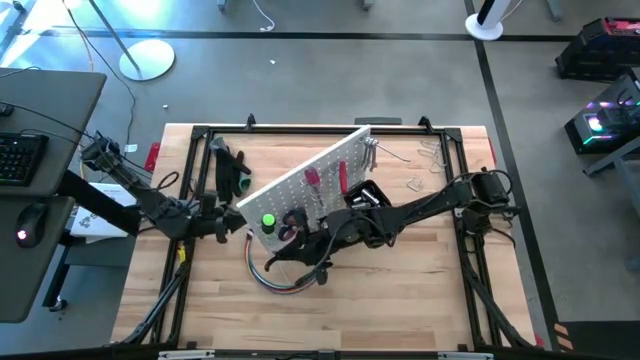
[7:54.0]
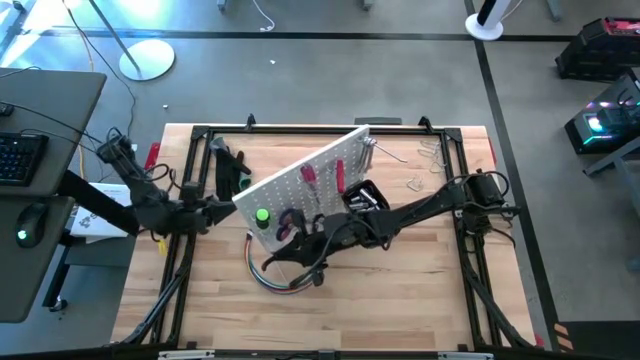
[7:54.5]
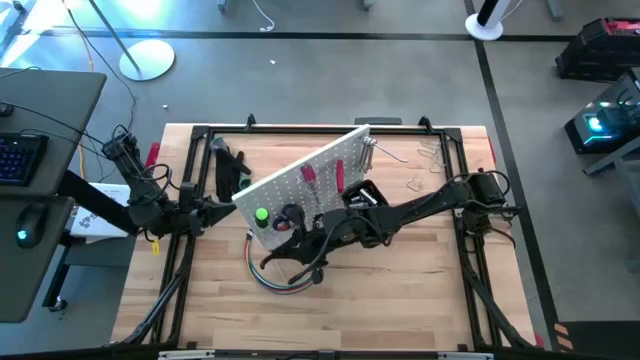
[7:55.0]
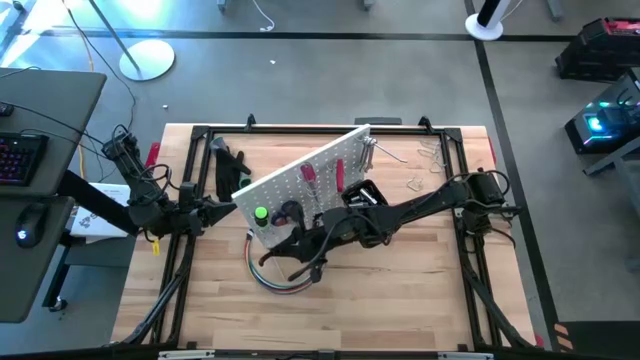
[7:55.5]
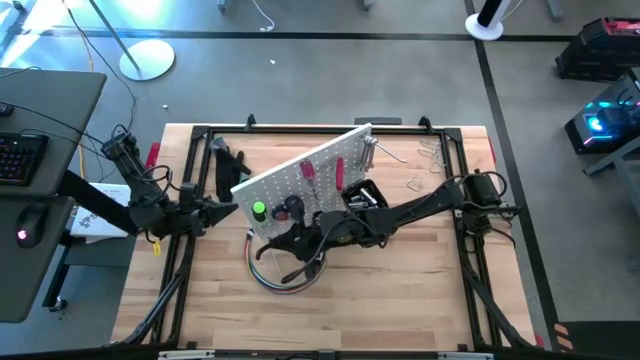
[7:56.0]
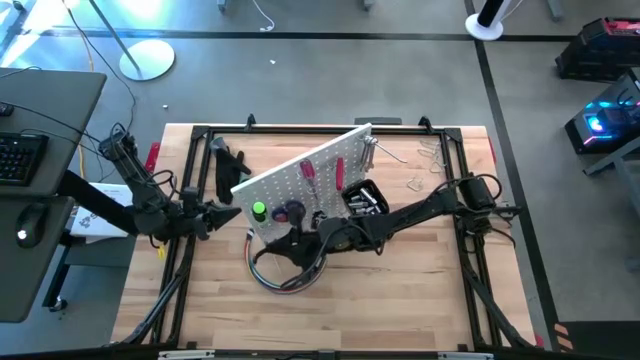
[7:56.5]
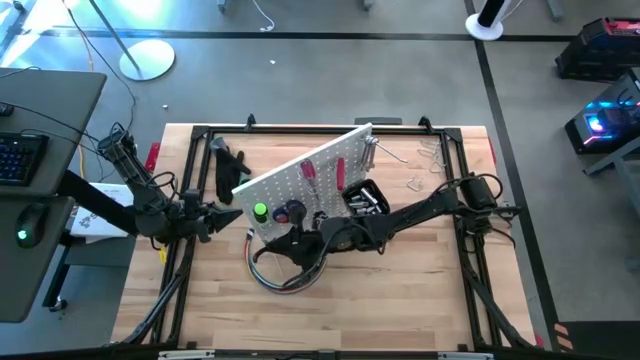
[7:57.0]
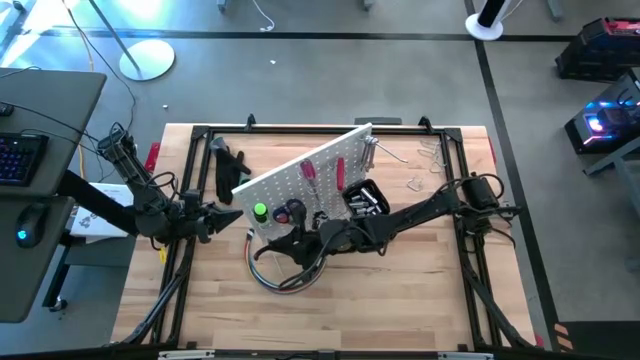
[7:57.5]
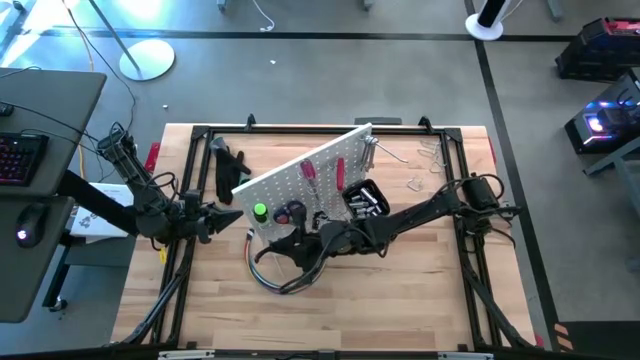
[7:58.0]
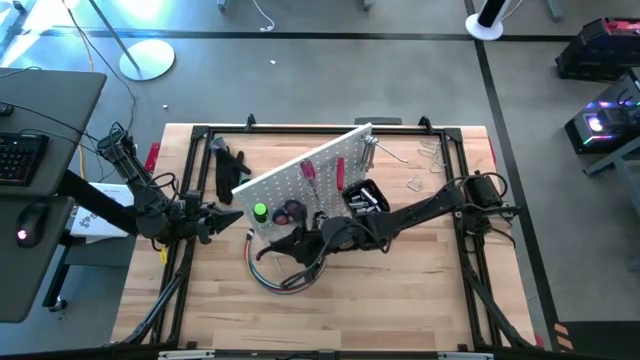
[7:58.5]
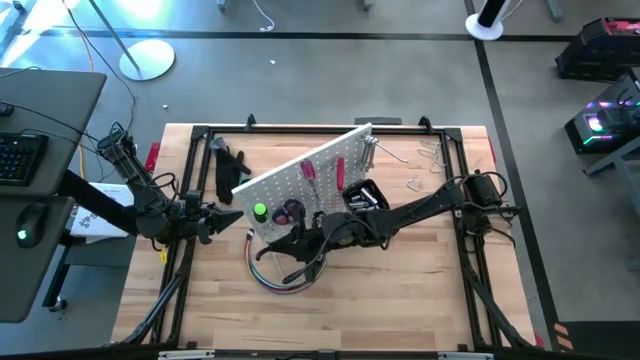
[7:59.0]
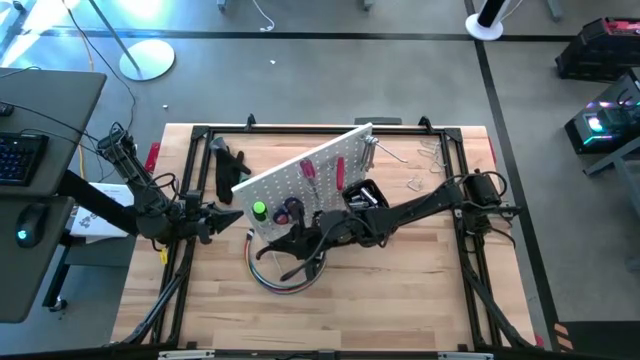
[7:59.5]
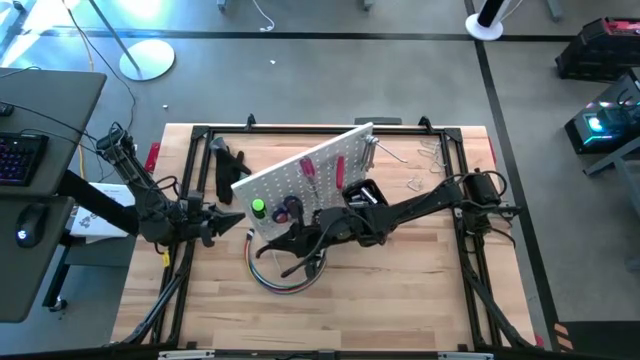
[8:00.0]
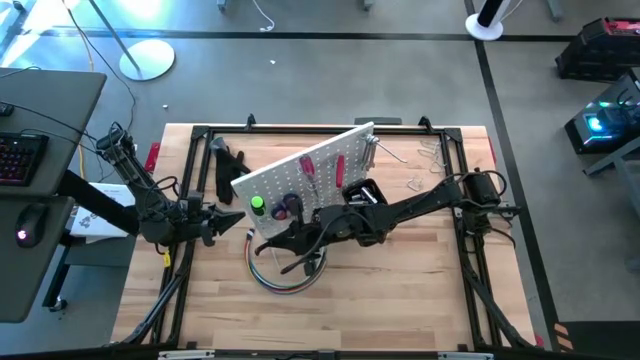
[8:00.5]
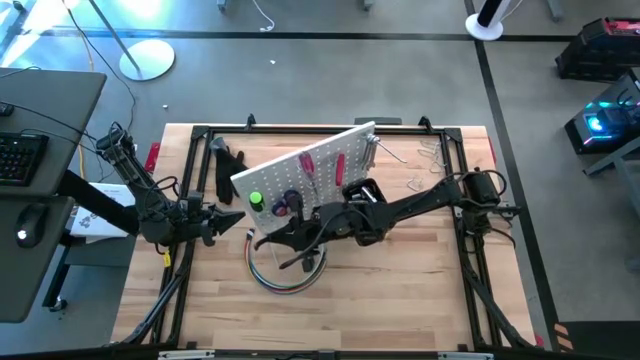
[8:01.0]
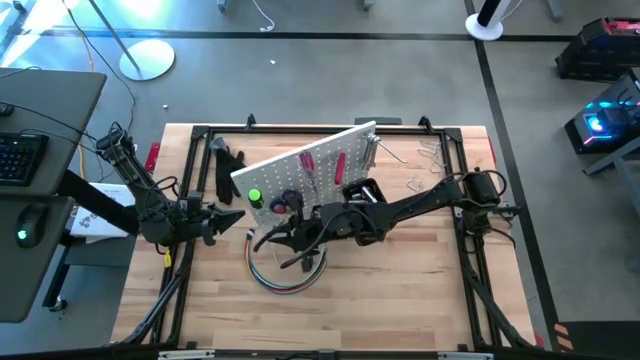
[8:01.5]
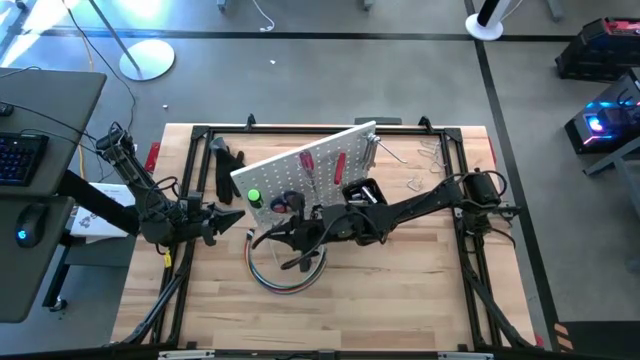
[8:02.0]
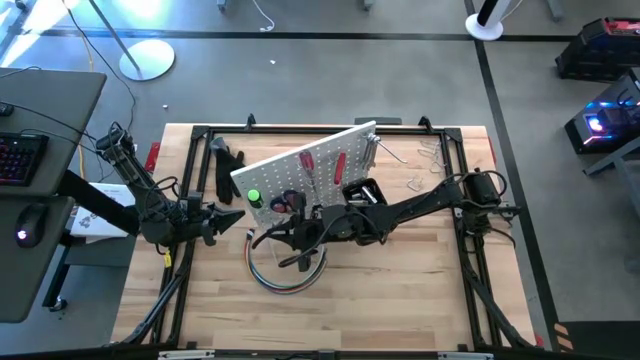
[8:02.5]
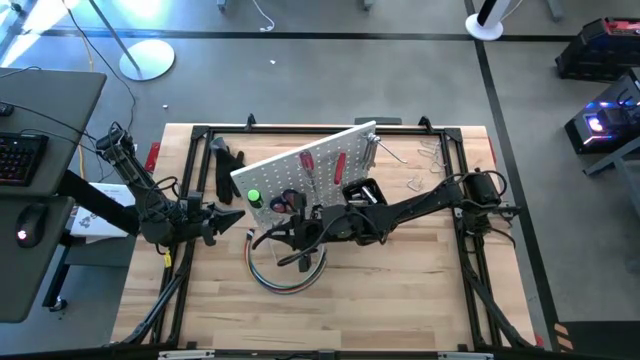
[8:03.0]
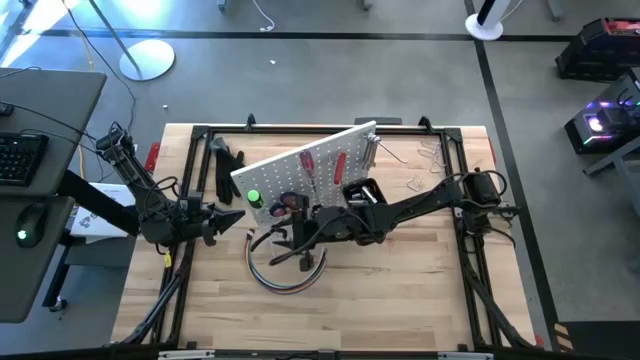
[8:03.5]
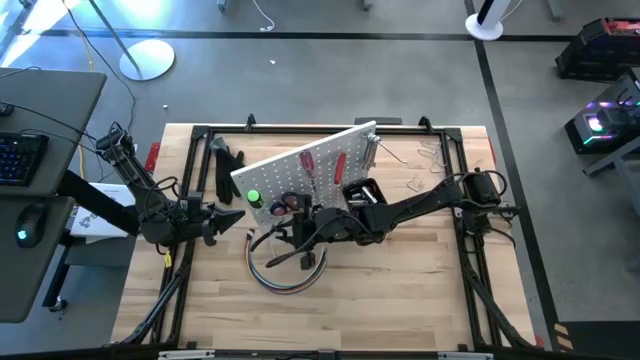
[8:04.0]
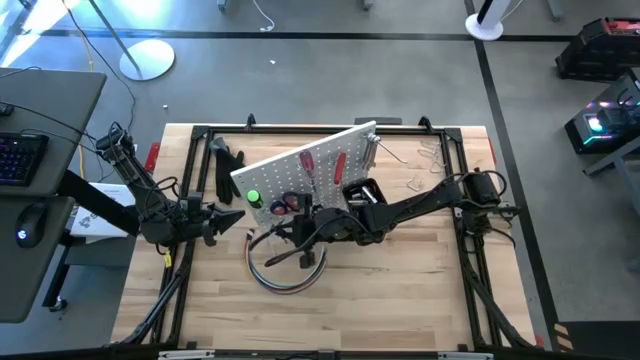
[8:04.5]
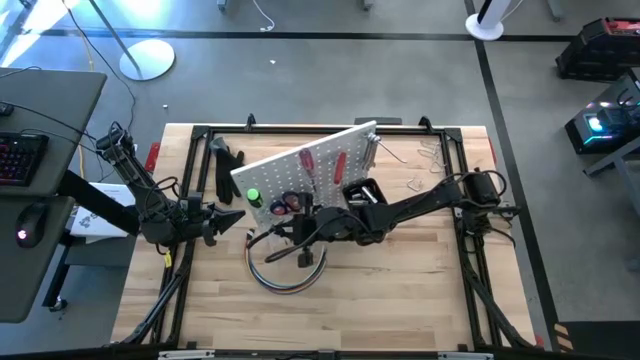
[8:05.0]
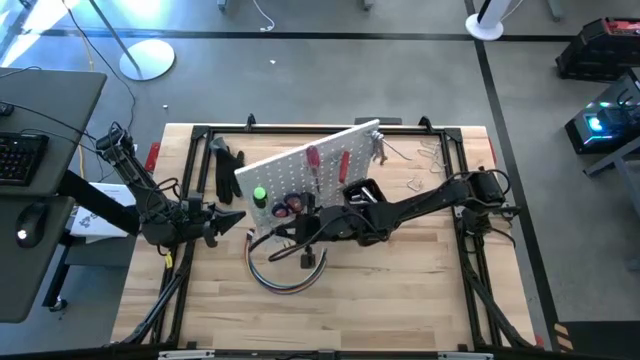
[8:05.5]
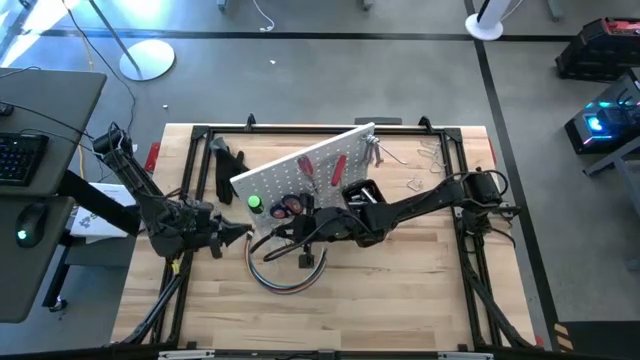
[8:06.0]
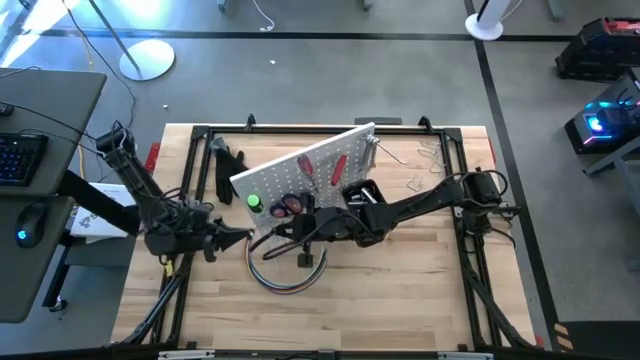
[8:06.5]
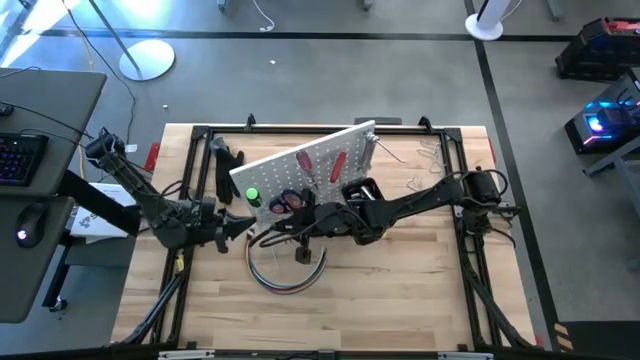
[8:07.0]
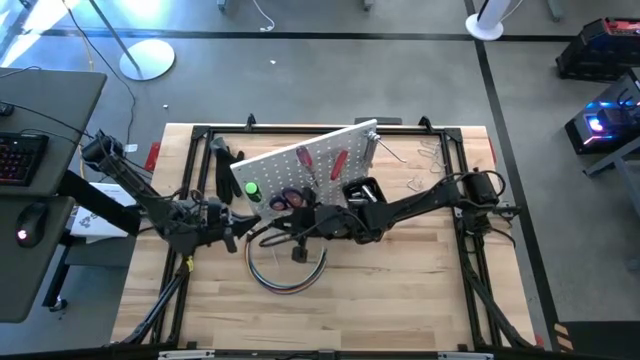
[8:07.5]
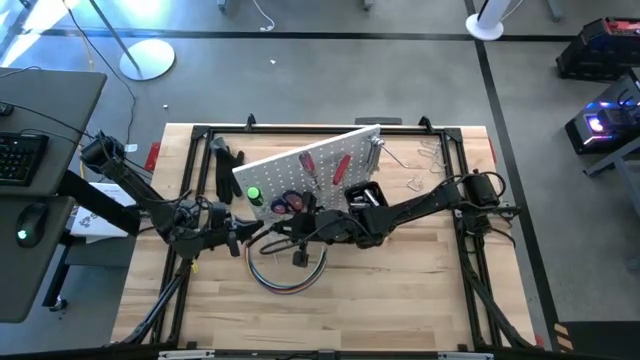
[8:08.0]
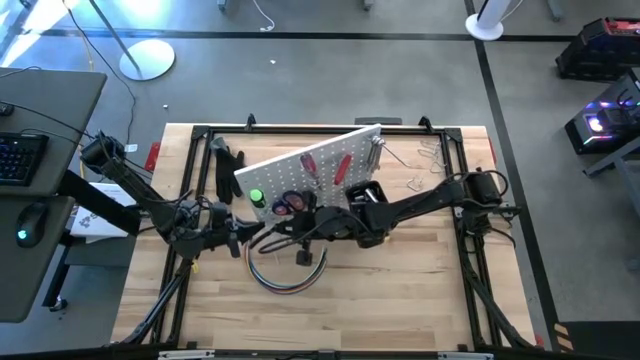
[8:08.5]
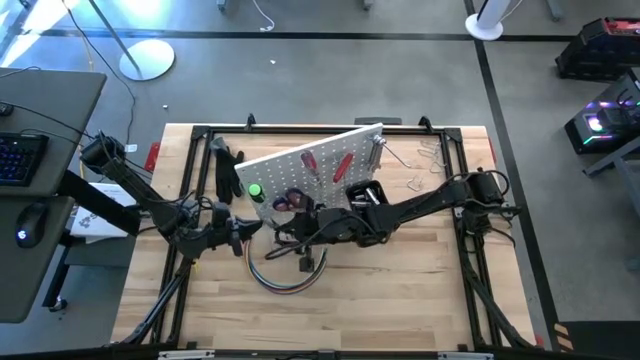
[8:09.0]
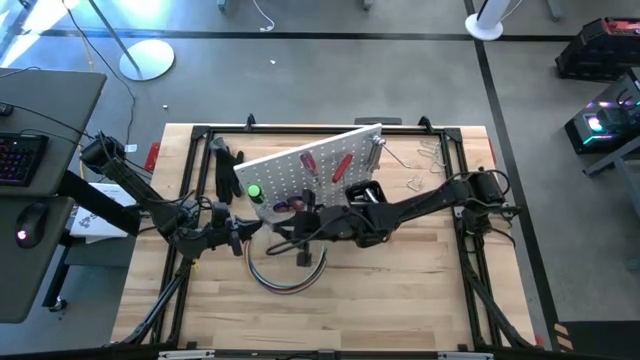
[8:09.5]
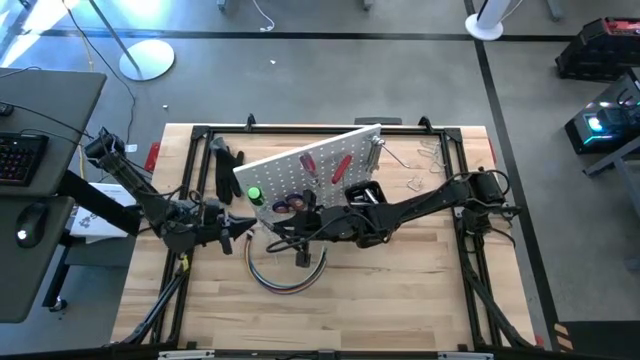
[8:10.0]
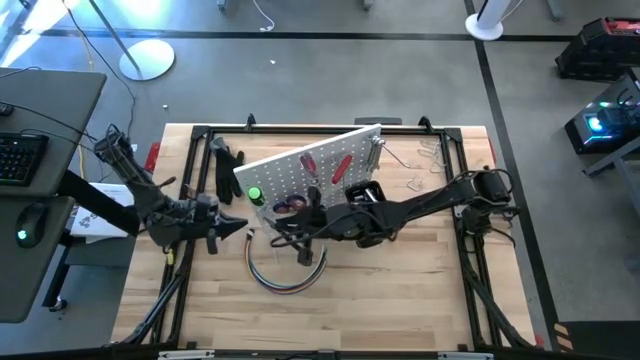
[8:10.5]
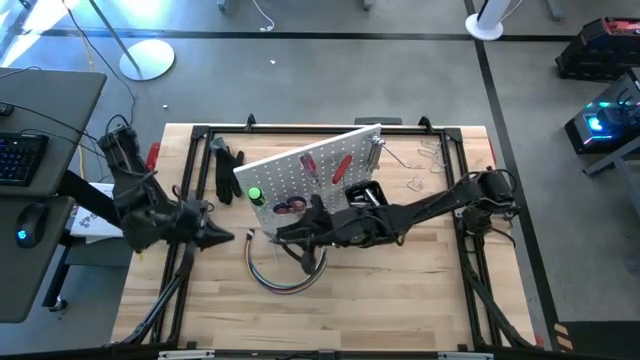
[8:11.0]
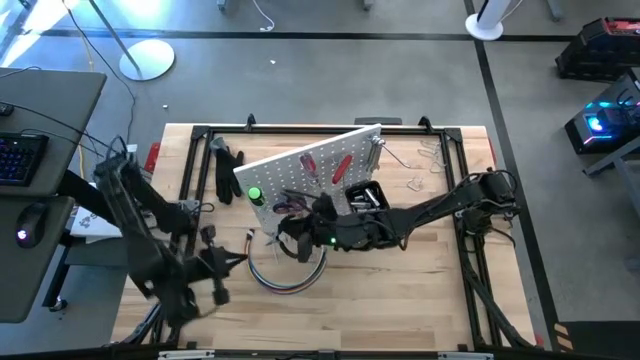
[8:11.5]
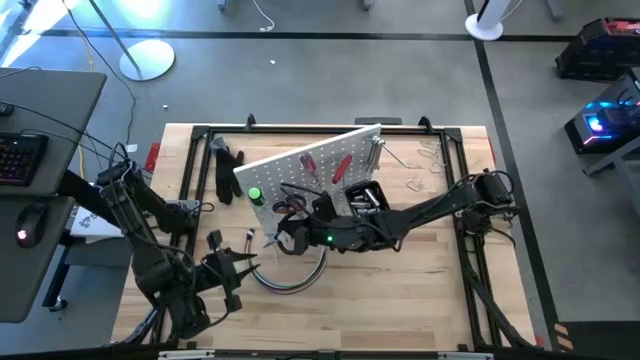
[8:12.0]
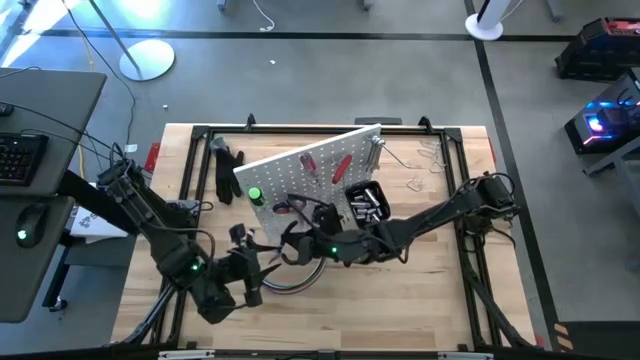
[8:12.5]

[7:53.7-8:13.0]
Task: Hang tools onto peg board
Hang the plier on the peg board

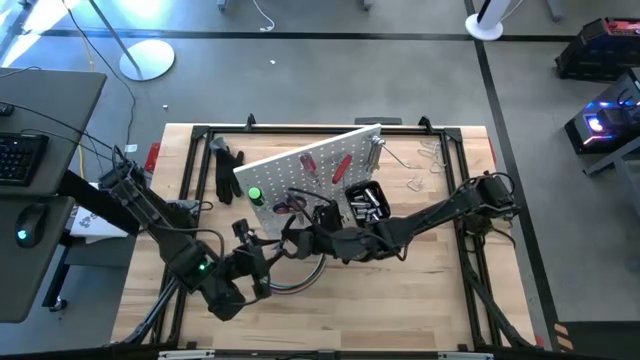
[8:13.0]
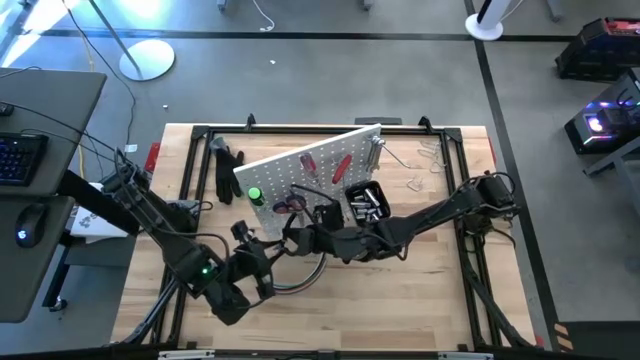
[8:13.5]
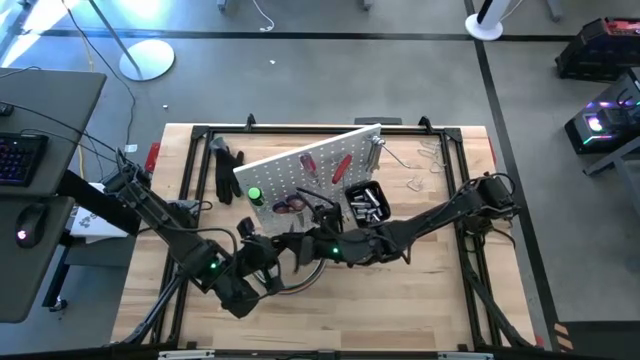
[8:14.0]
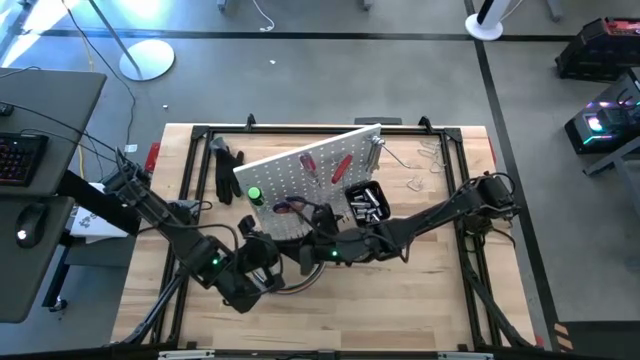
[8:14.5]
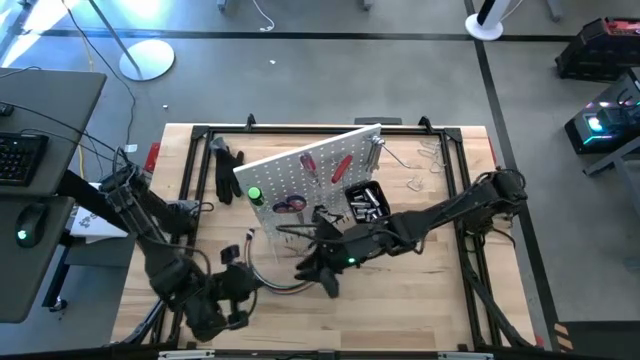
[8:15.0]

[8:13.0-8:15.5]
Hang the plier on the peg board
